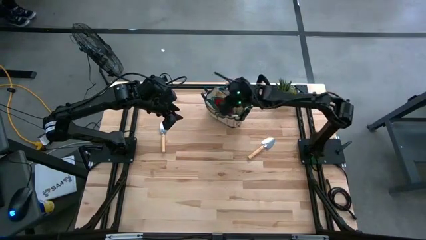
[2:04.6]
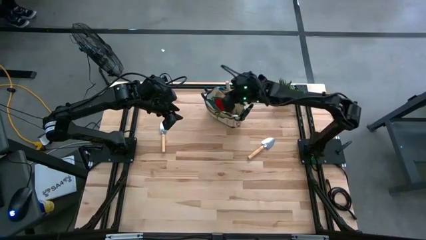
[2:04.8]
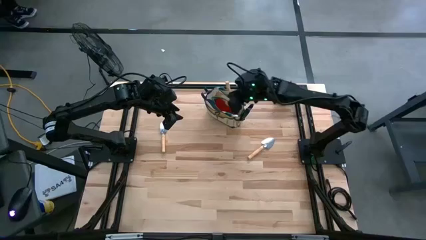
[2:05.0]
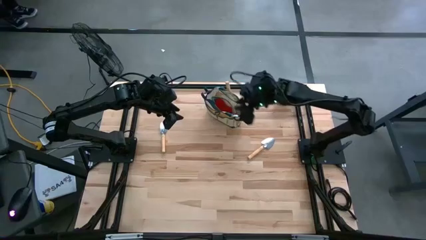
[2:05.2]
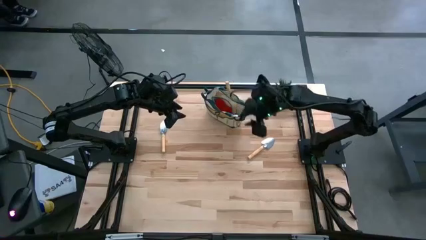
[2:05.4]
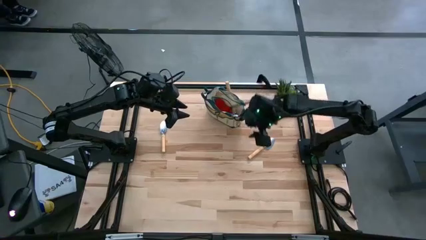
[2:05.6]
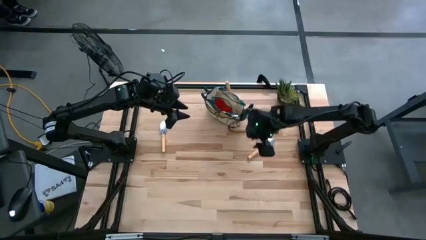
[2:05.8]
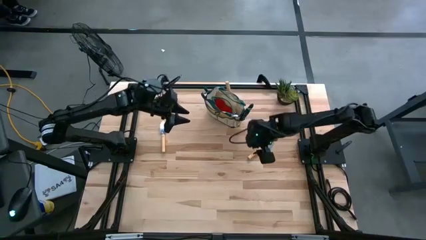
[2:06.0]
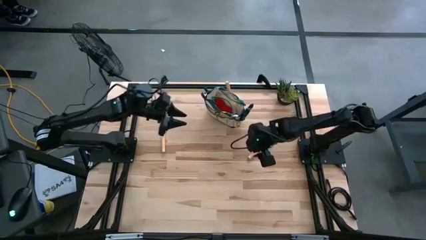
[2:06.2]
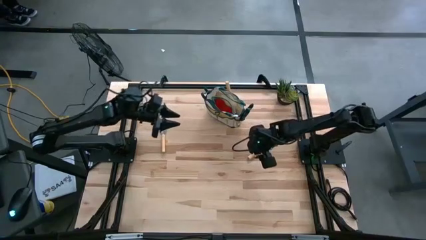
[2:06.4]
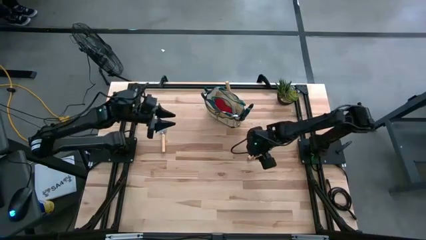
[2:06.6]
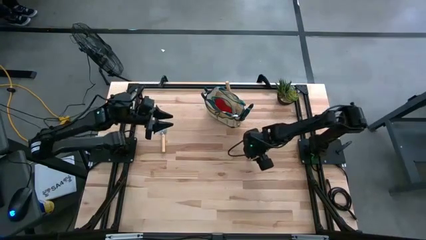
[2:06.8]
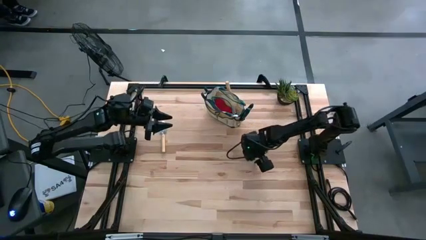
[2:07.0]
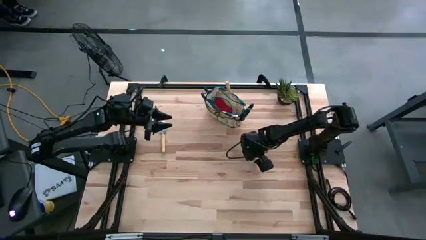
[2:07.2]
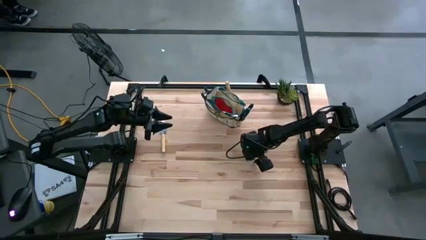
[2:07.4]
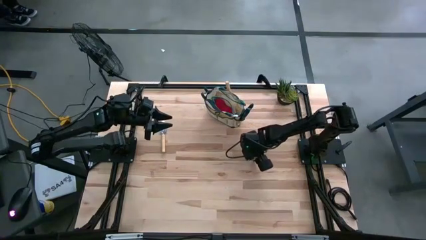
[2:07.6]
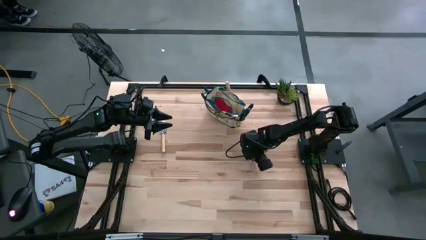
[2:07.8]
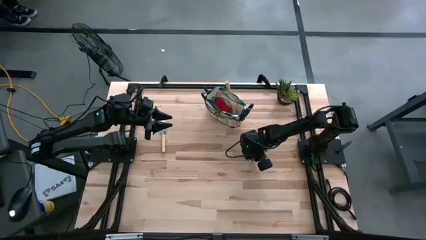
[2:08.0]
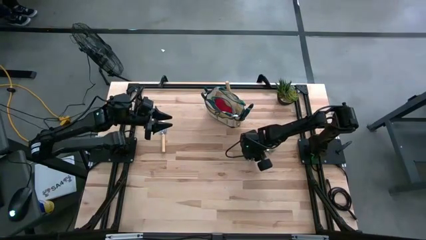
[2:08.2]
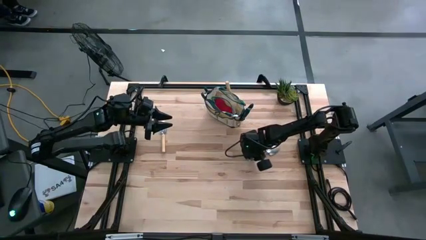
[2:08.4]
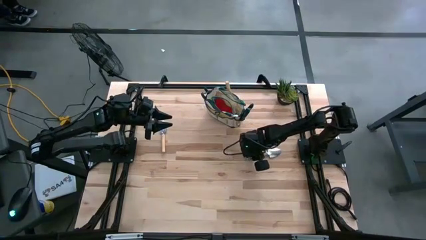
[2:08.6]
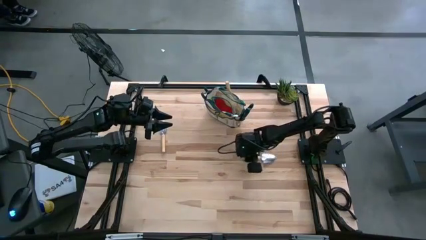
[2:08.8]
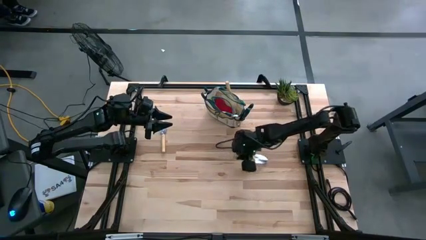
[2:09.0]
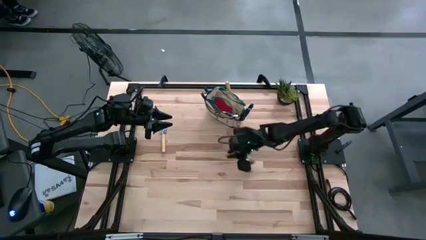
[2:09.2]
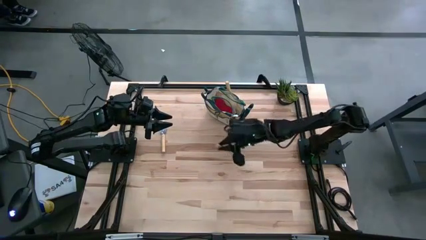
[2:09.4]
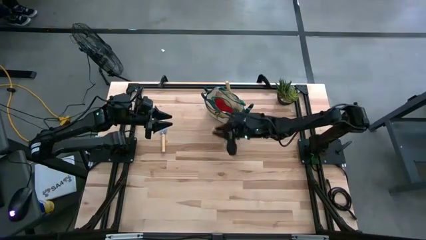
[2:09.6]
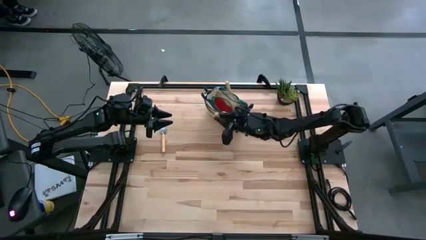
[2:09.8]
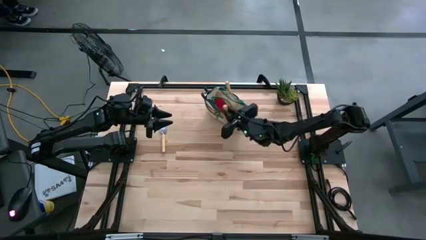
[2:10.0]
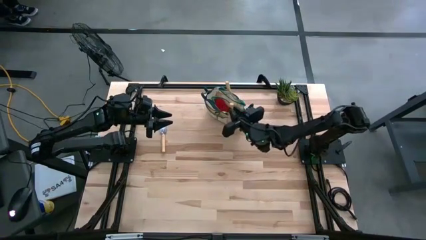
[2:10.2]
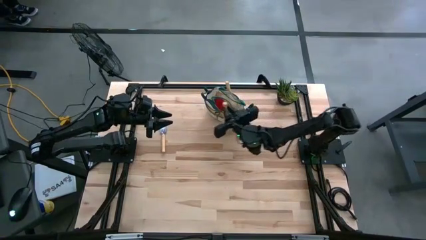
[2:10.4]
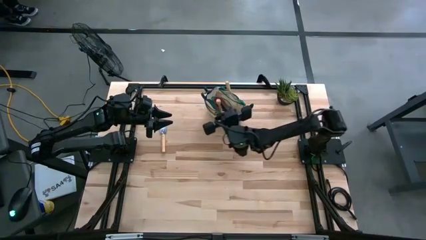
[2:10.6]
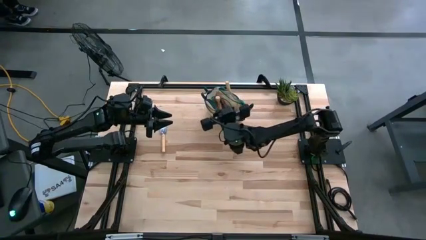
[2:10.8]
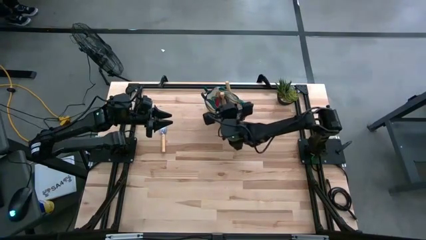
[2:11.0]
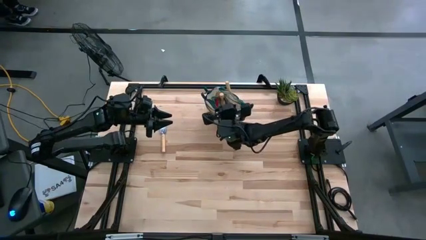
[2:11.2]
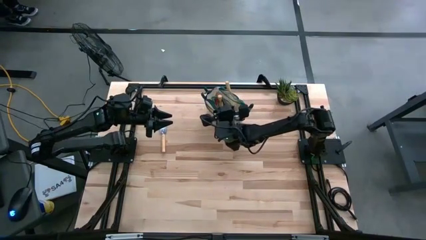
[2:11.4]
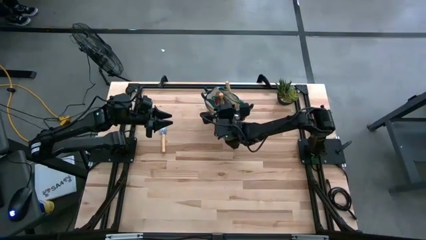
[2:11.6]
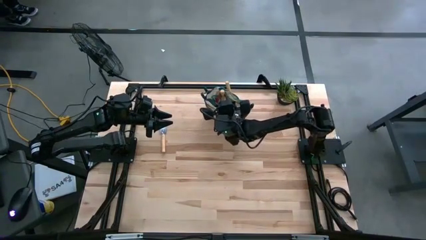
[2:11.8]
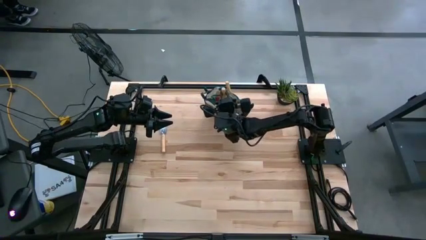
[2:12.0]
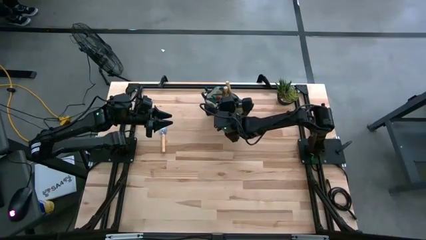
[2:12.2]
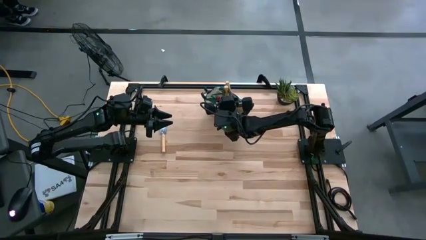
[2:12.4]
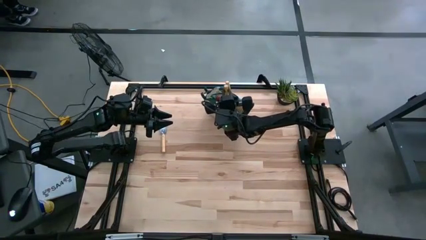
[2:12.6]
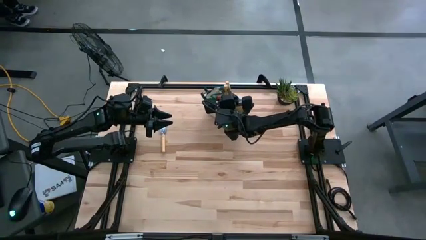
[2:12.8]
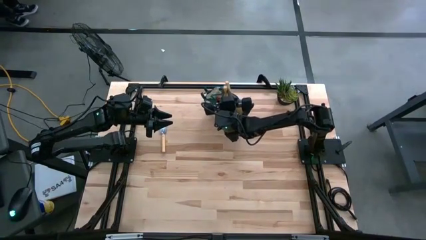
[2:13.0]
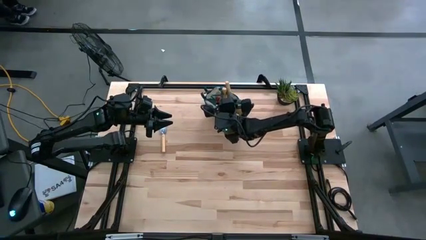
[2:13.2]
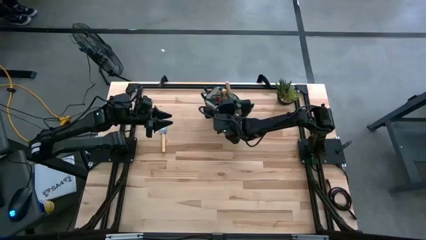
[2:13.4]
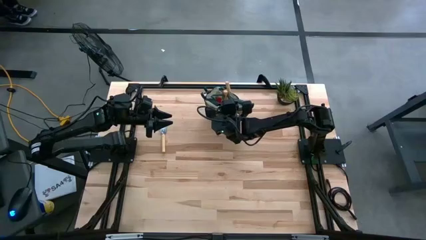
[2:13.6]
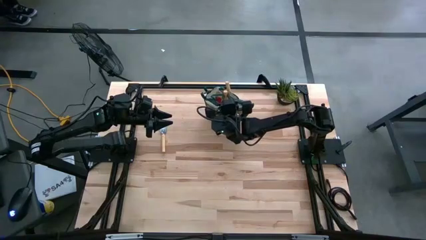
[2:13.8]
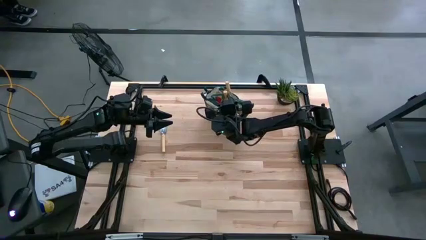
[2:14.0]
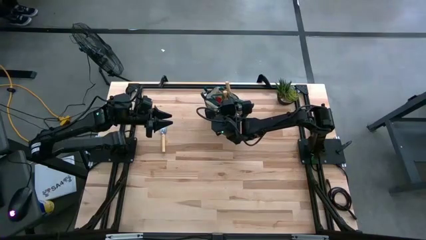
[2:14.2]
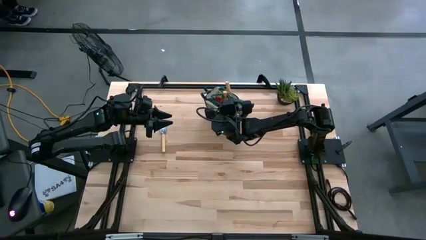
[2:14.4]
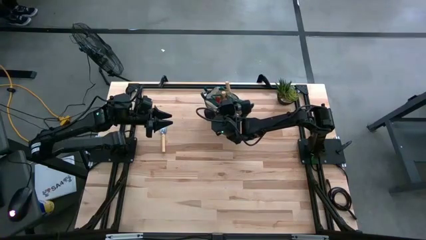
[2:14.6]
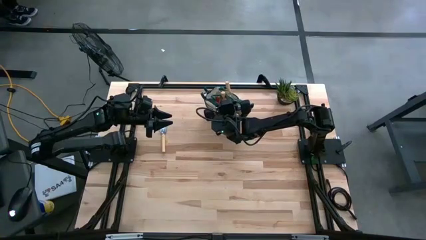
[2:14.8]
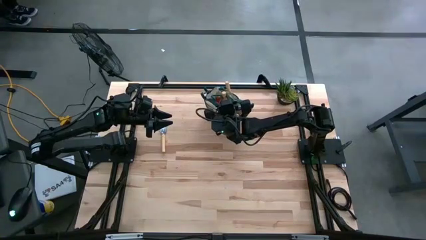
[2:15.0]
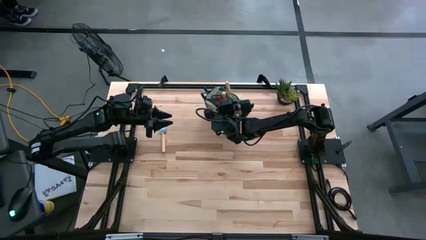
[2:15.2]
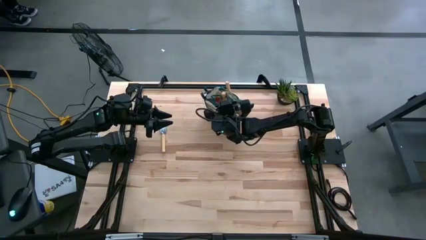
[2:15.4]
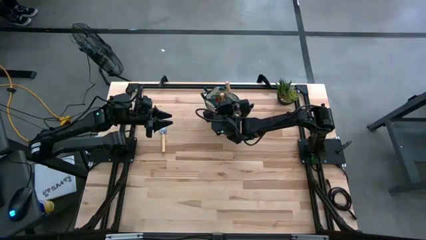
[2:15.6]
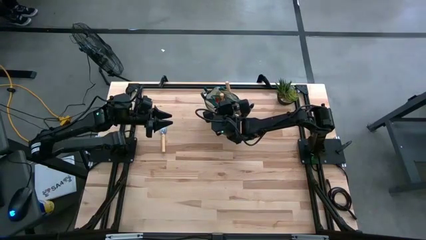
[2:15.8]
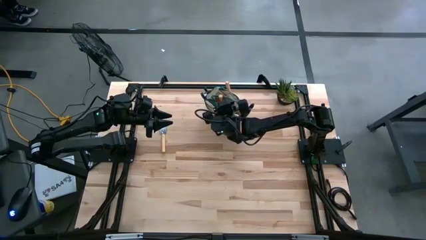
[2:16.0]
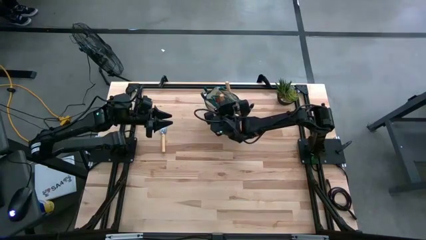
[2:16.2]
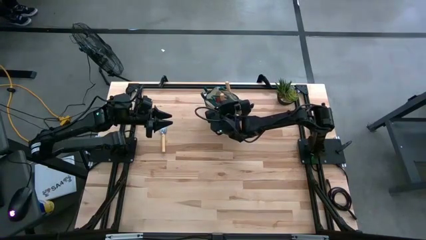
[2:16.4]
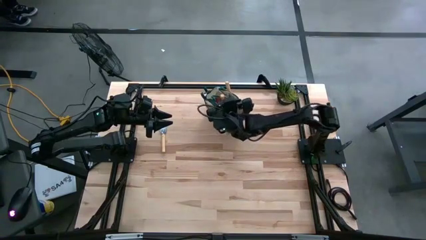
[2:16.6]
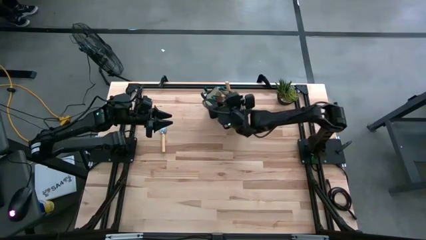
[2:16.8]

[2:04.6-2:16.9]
Task: Pick & Place Garden tools in Gardening bag
Put the right trowel into the gardening bag

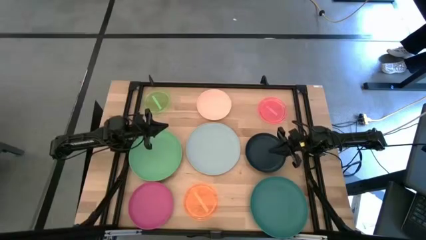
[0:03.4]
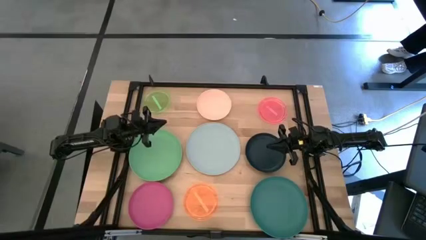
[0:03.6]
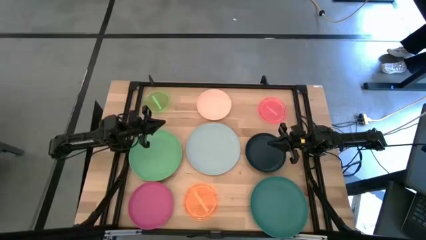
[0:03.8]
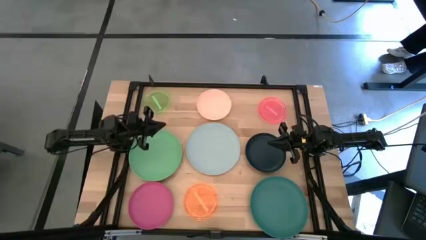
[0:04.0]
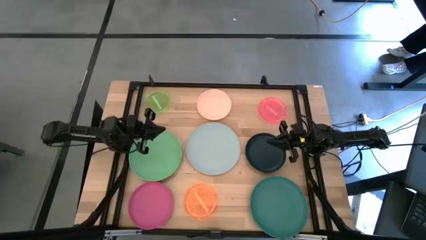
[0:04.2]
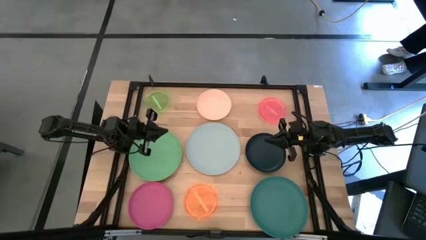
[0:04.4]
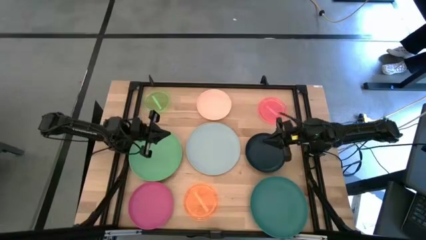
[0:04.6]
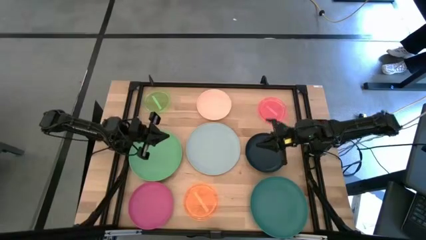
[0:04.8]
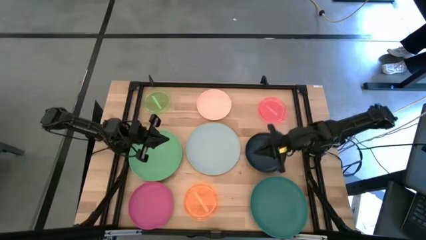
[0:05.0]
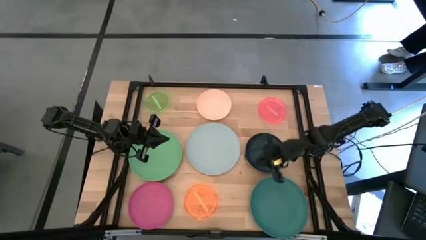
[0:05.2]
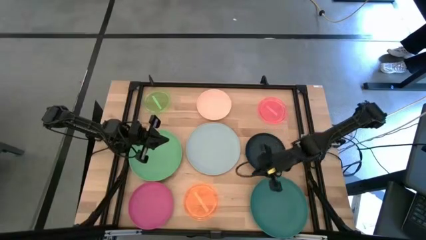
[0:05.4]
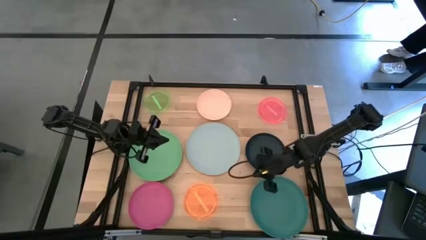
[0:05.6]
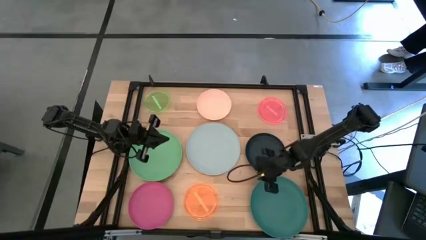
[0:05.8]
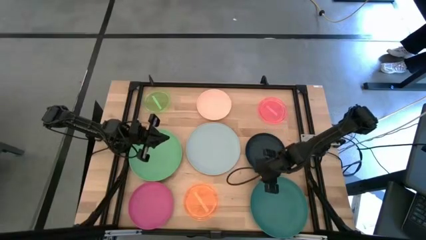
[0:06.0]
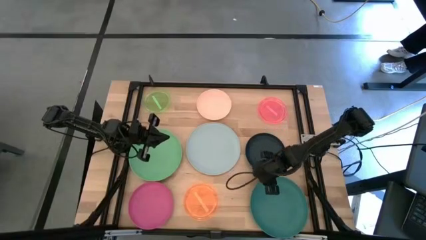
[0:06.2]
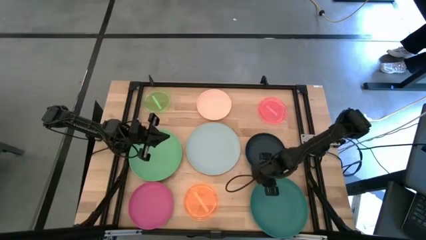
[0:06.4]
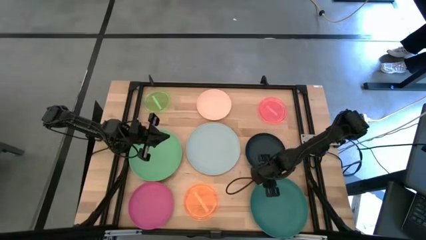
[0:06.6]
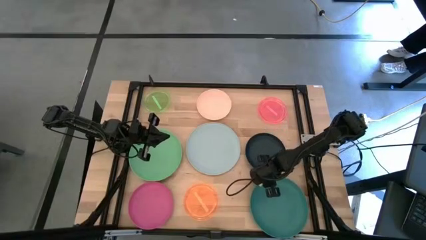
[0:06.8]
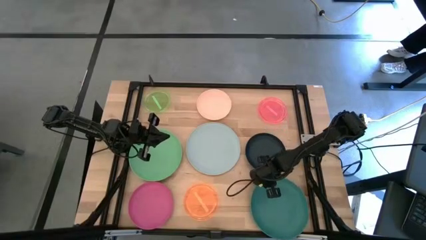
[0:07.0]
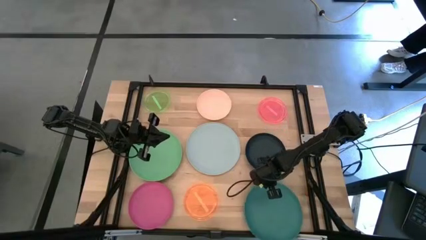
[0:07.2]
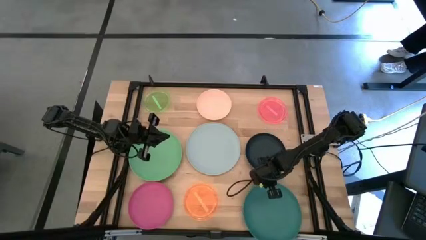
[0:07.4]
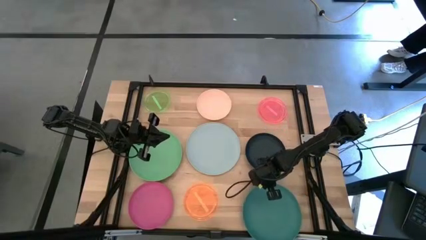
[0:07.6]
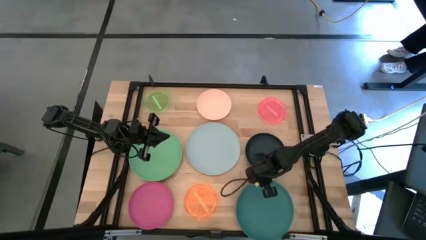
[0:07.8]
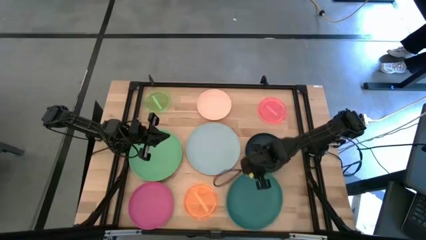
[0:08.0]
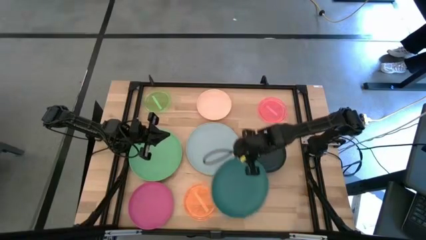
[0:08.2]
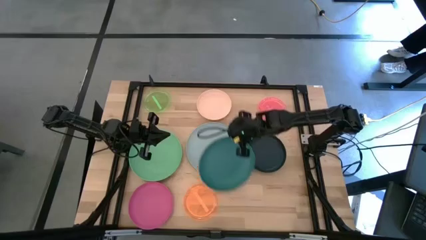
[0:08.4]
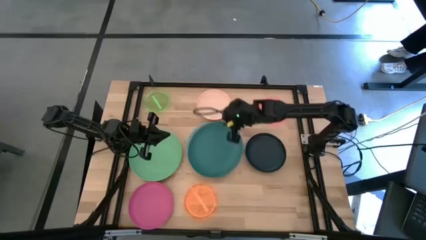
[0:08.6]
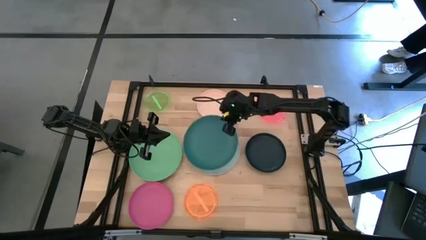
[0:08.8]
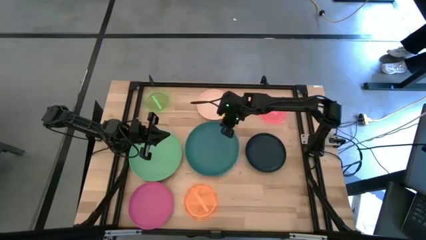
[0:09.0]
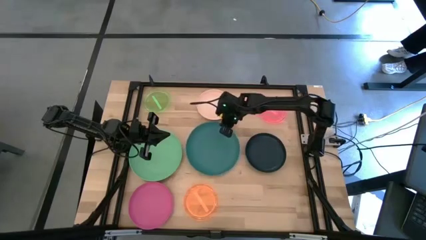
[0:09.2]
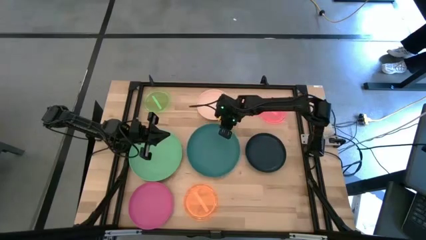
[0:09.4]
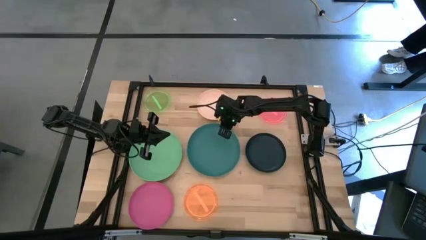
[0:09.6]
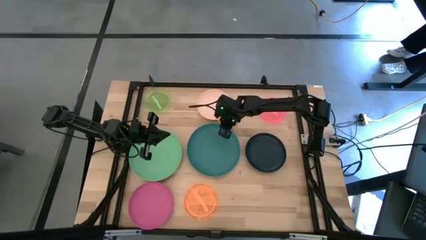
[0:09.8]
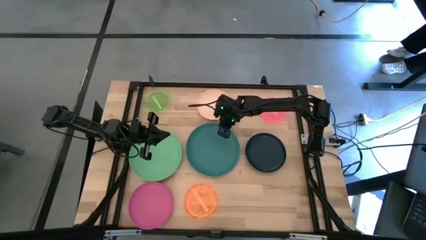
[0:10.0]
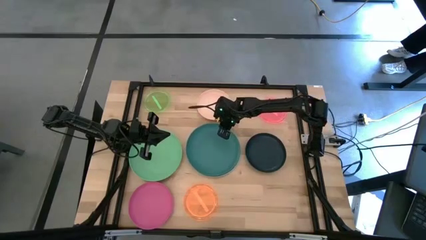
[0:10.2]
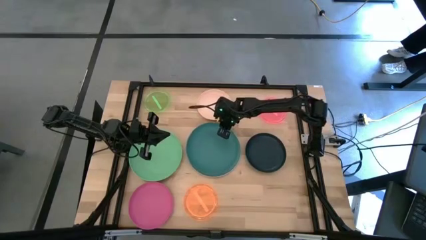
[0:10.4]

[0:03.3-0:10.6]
Task: Stack plastic plates
Stack the blue plate on top of the gray plate
